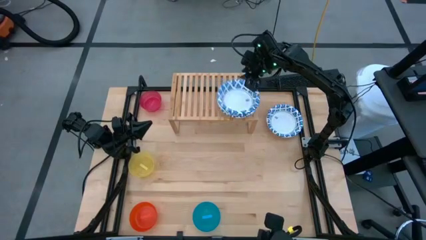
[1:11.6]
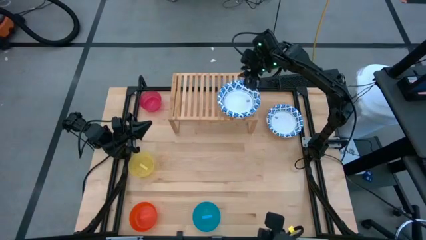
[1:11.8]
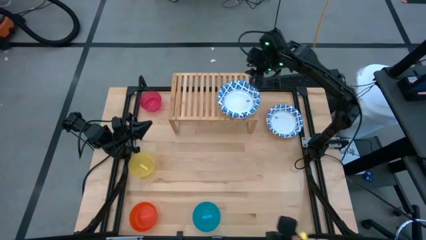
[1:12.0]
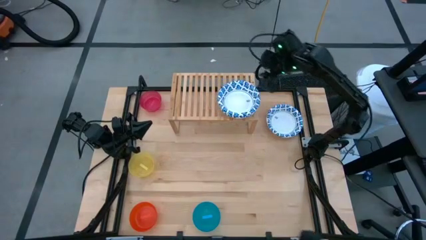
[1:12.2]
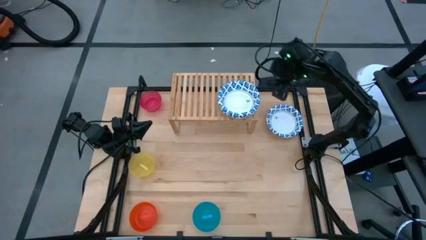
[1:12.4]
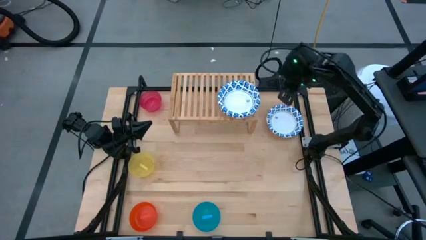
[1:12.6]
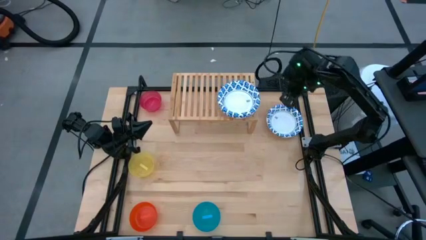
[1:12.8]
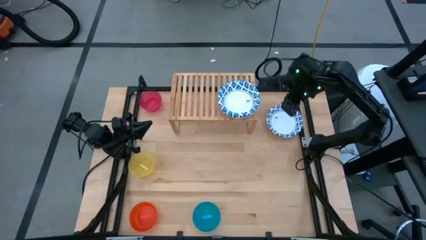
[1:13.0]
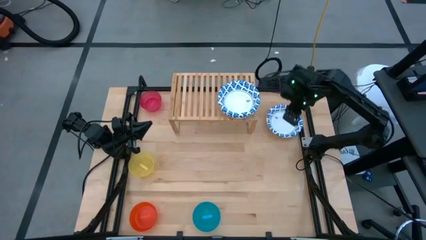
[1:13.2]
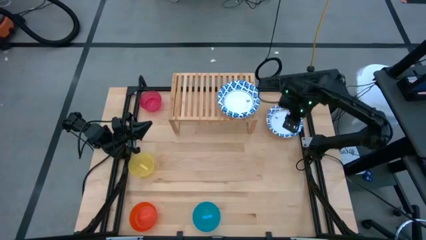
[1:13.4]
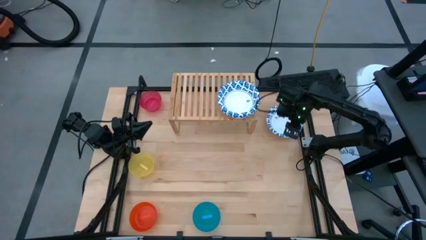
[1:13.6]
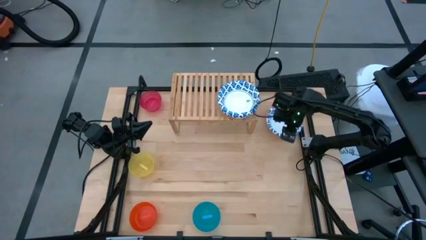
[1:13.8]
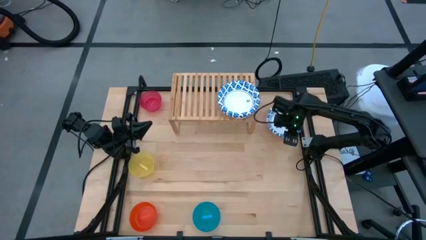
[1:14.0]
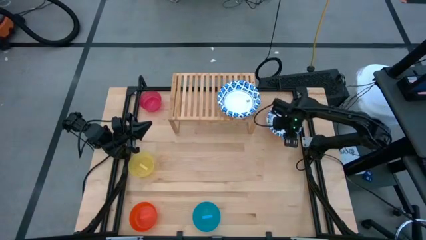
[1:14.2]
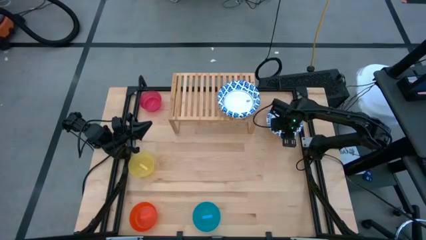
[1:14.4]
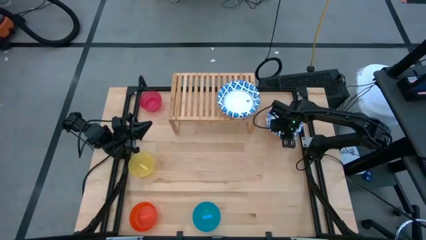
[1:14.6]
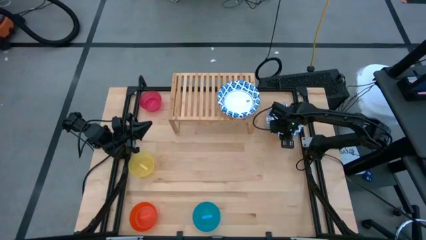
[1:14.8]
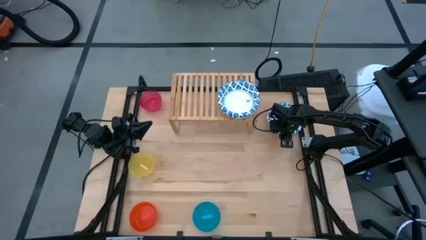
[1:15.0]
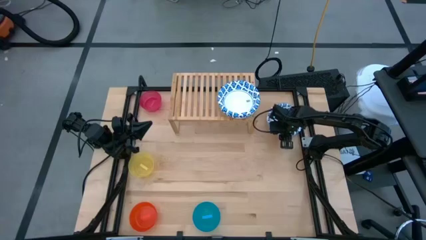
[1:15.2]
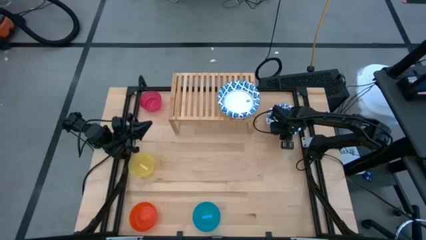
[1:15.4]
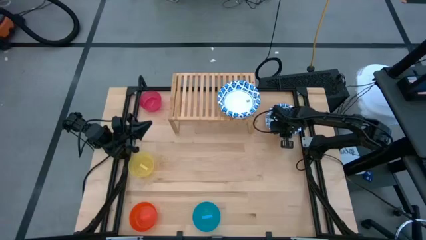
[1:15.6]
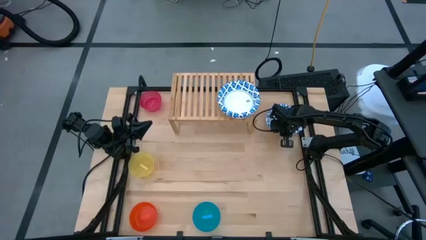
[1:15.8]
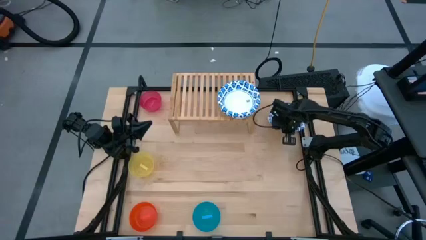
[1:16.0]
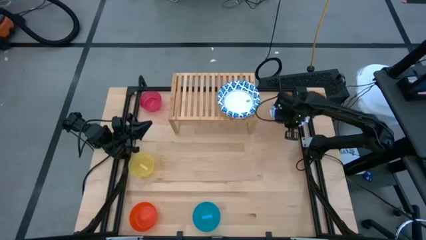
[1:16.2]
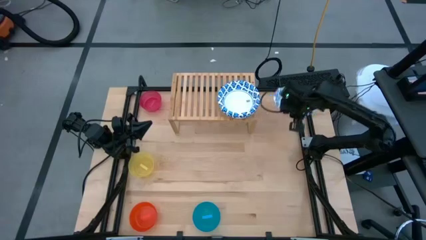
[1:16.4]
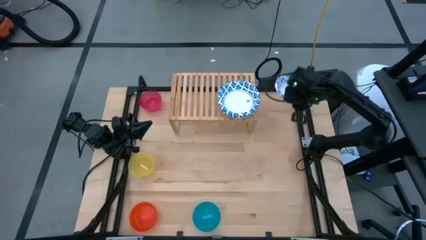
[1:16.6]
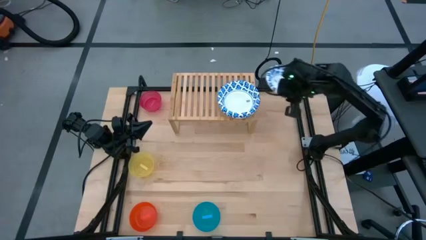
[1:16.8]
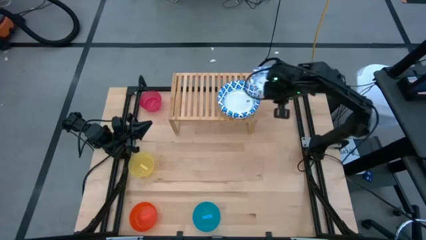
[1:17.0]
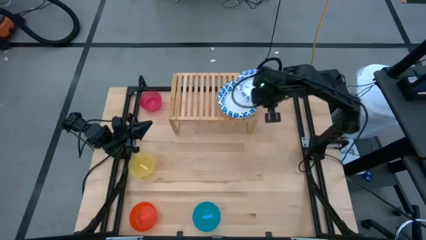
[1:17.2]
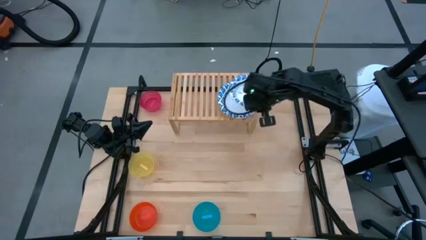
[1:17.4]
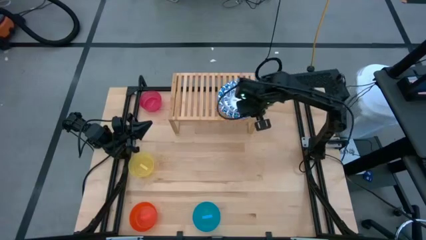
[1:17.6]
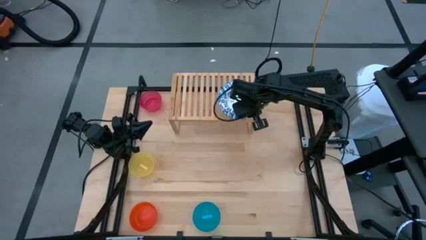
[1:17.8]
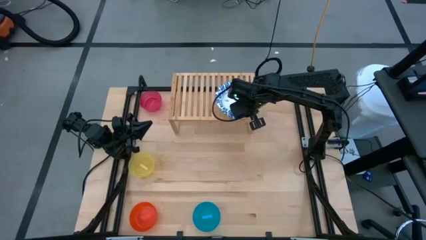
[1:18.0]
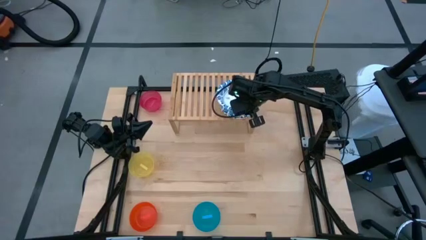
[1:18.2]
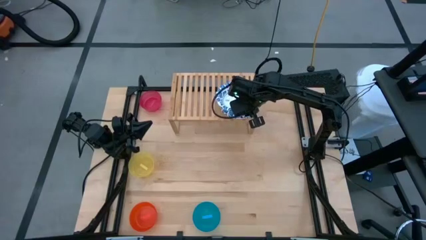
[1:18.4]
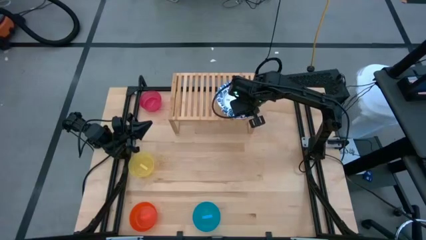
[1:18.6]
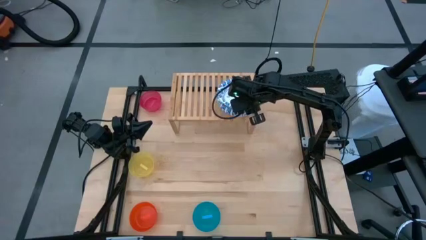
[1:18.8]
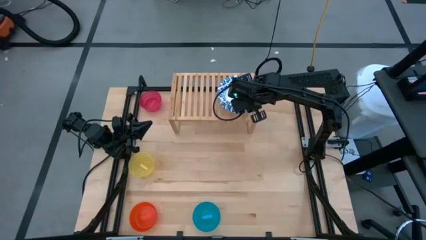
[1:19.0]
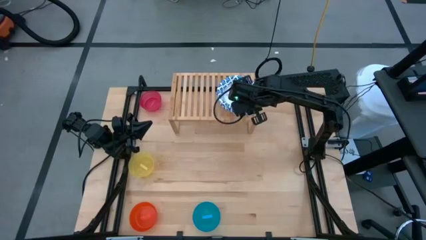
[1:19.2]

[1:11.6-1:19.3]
Task: Place and stack bowls onto a shelf
Stack the white bowl on top of the white bowl on the shelf

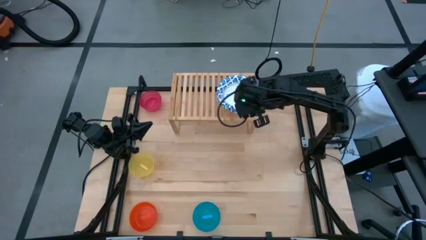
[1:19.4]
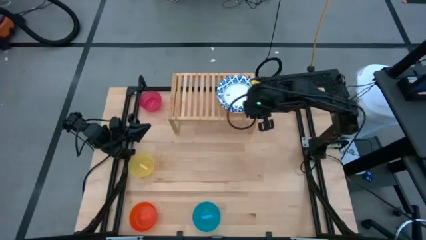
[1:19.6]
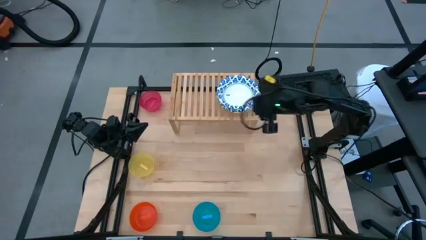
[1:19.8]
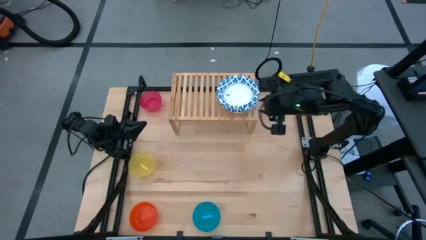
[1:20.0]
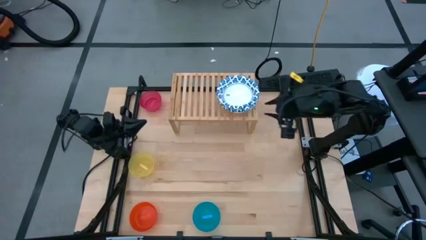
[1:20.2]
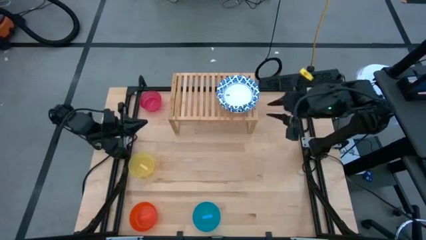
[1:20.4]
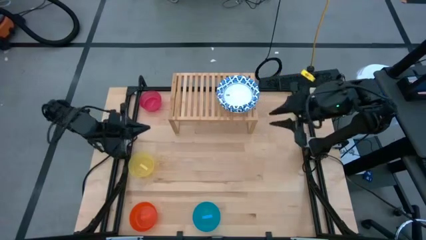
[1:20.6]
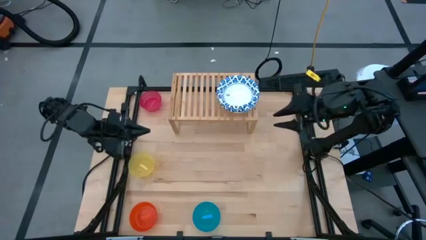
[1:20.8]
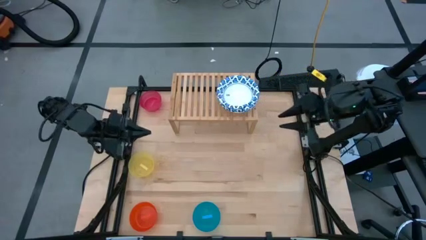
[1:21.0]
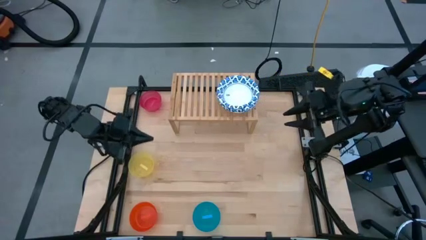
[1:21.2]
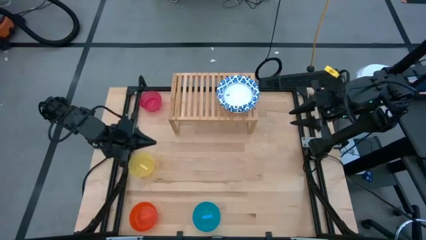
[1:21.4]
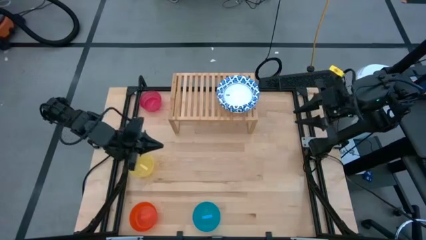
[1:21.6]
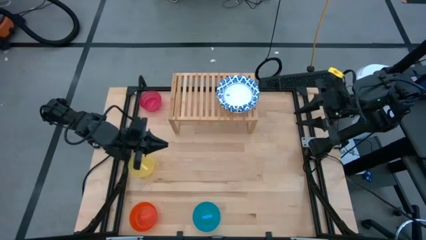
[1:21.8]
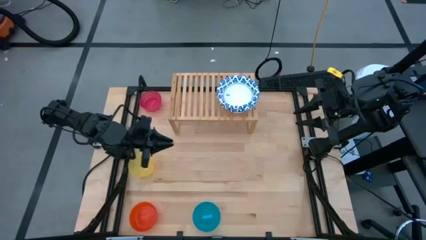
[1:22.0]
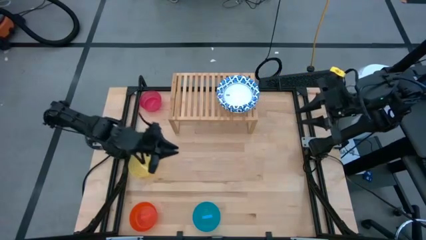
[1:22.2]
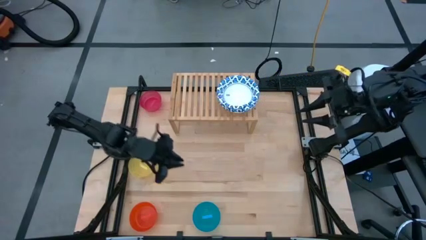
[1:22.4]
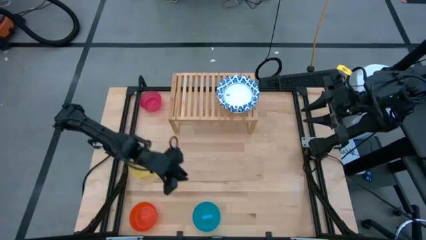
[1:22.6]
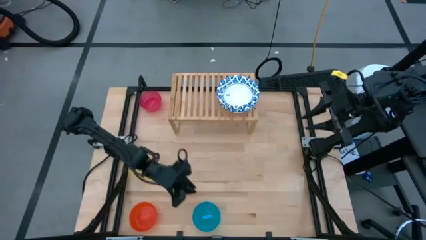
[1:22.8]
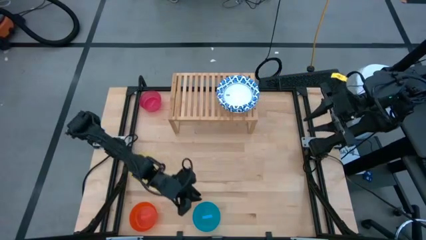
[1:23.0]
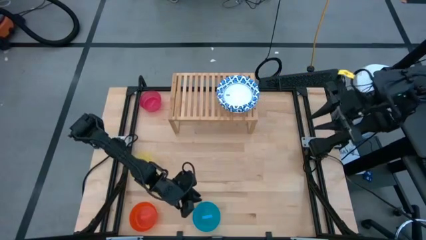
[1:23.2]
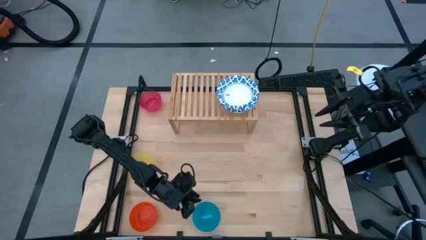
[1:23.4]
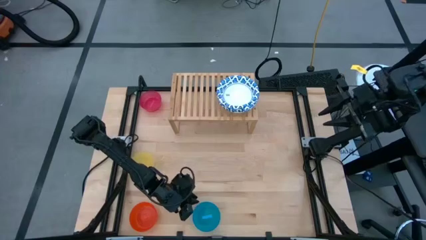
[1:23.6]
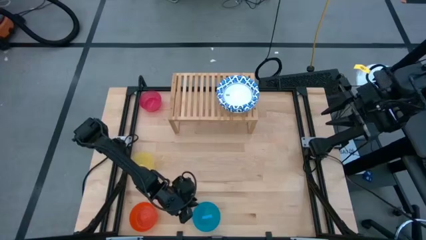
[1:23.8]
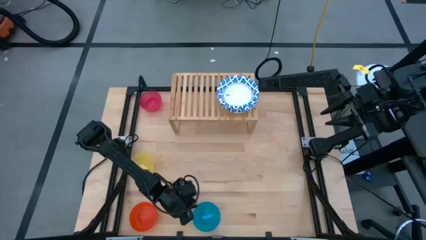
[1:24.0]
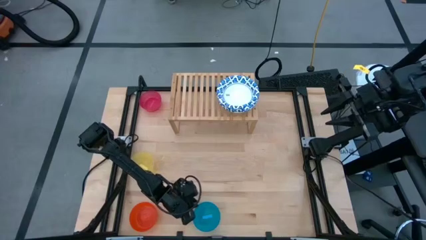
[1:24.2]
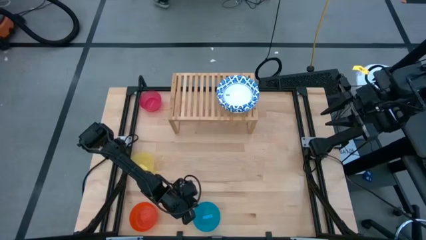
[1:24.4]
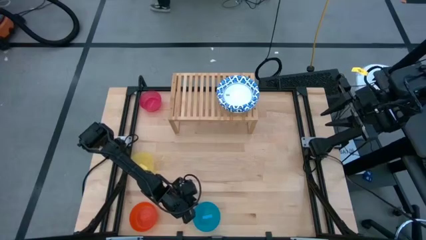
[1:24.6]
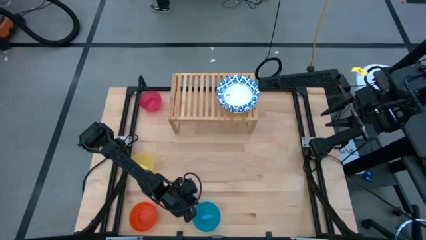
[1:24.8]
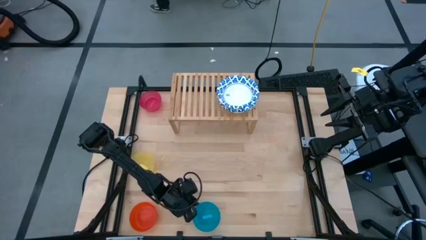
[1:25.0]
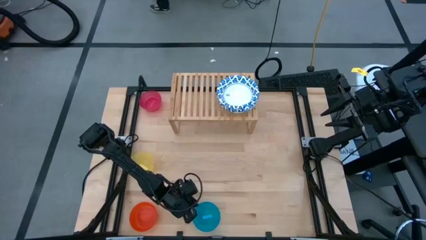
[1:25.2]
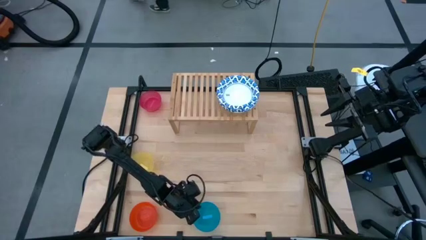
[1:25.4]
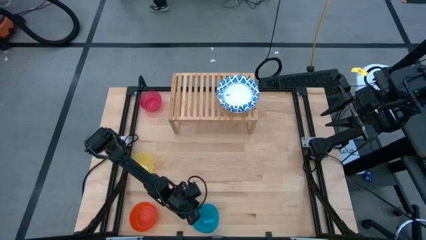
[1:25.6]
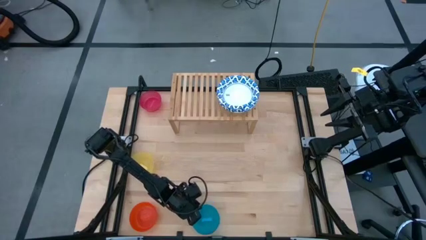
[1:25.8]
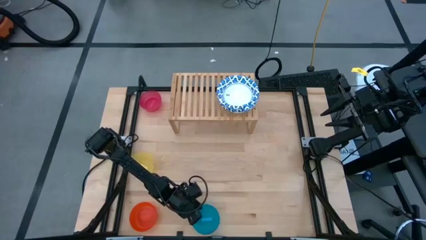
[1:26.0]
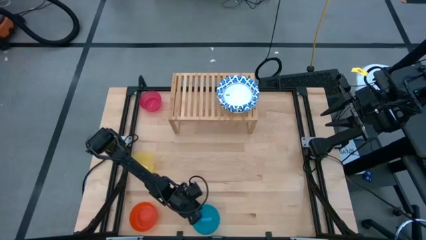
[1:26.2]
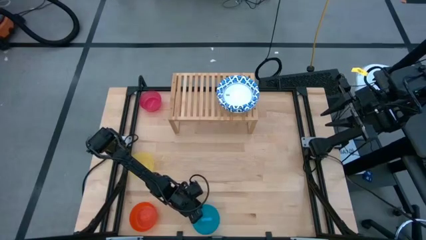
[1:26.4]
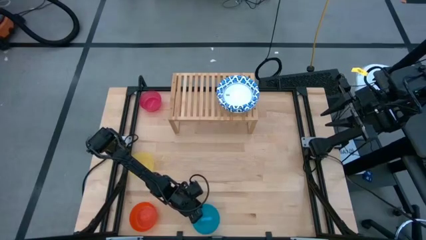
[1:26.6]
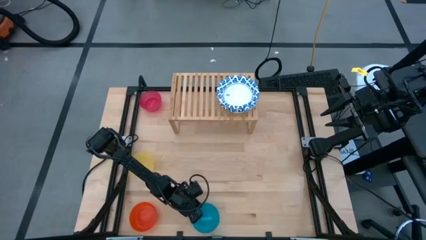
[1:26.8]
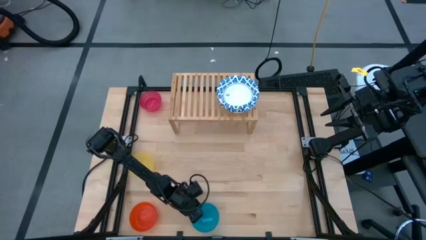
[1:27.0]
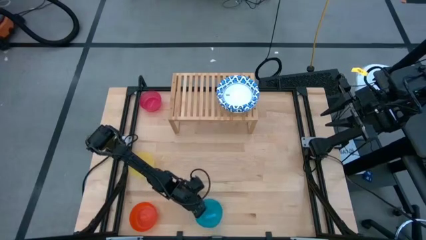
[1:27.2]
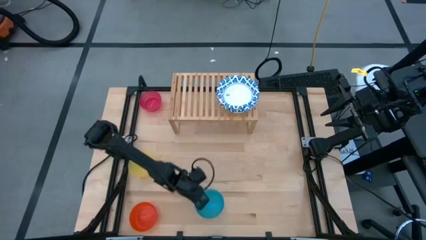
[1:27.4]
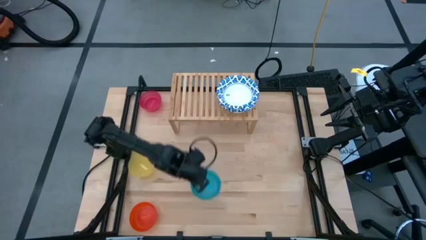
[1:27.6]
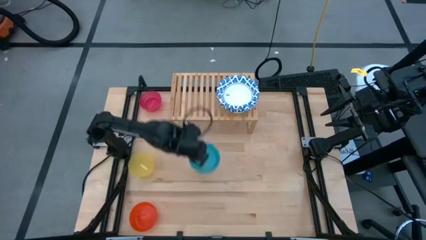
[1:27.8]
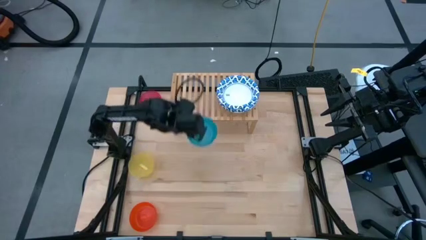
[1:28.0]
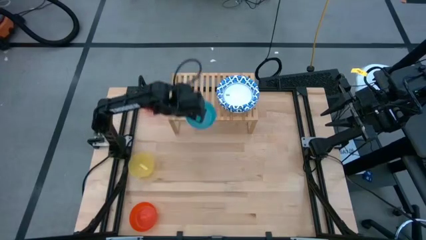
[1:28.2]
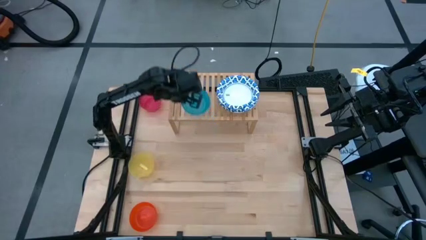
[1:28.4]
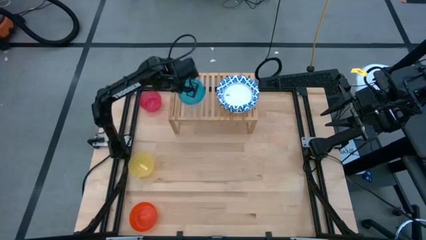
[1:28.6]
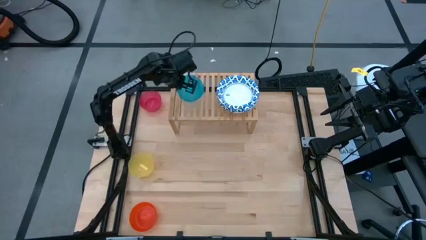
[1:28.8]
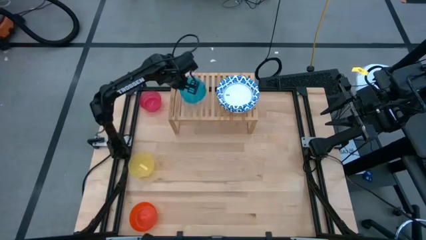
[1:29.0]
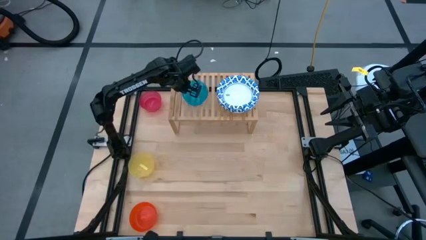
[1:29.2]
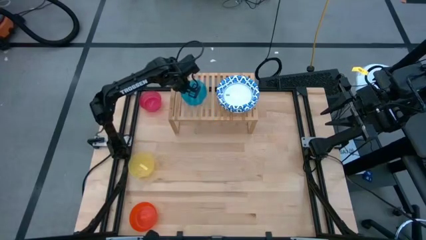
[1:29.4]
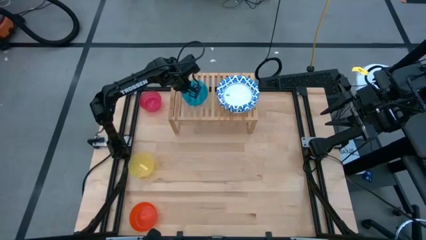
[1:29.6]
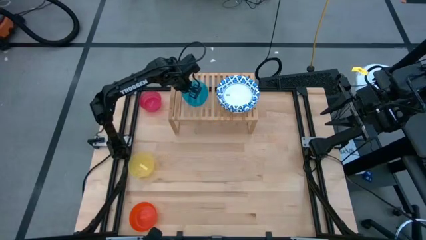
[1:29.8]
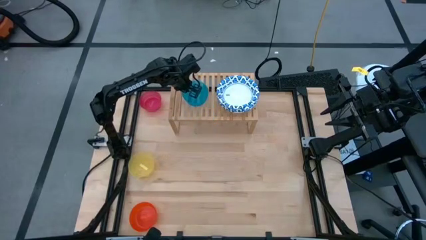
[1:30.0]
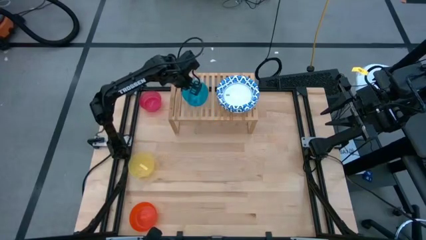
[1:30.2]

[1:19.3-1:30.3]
Put the blue bowl on the shelf
